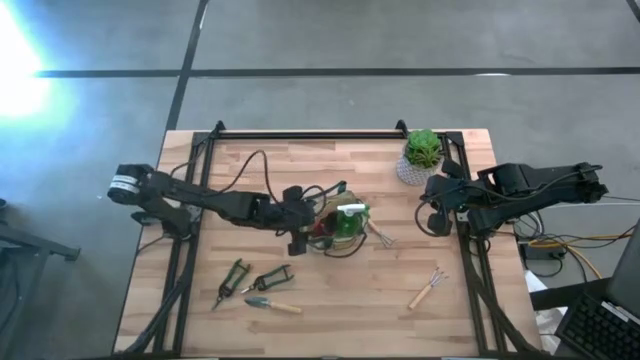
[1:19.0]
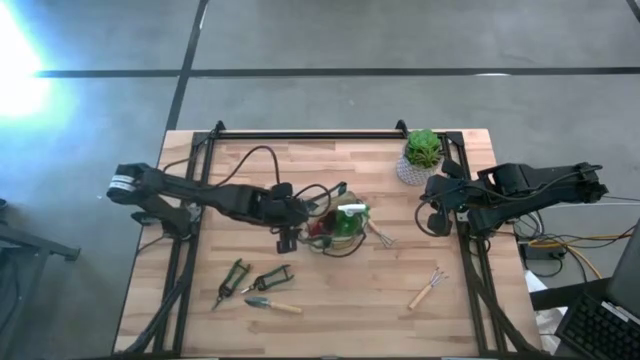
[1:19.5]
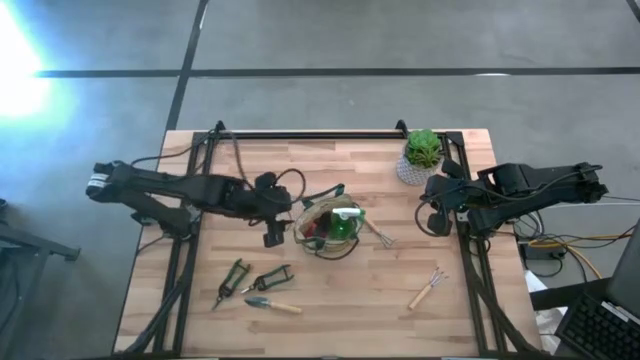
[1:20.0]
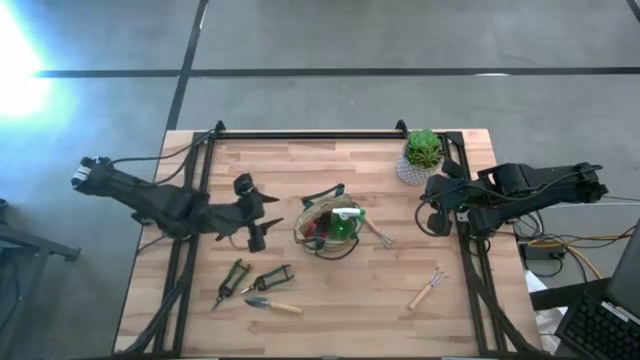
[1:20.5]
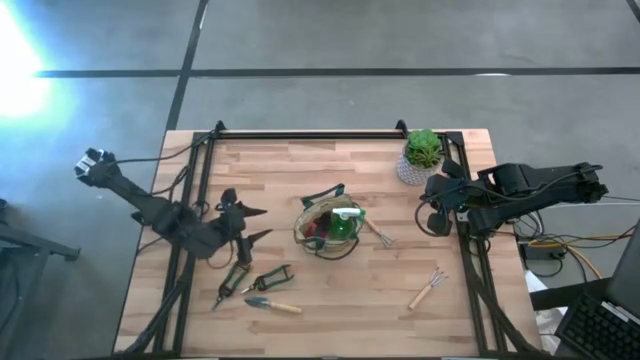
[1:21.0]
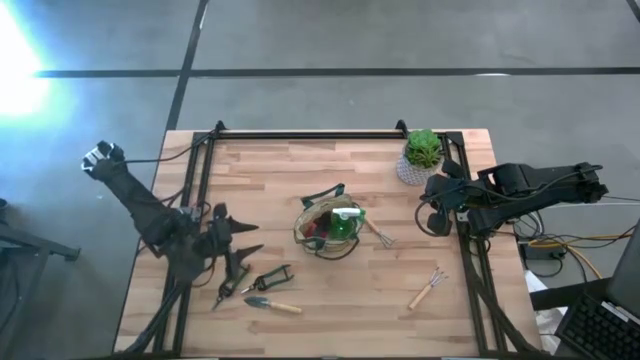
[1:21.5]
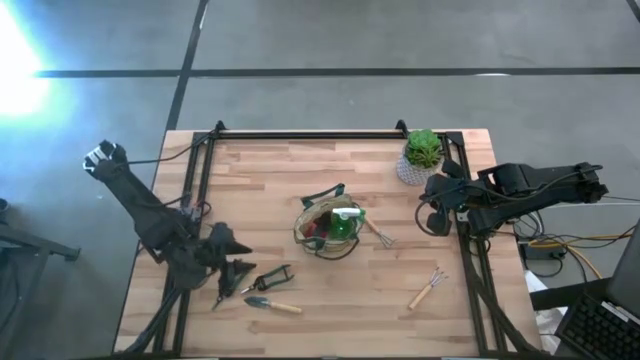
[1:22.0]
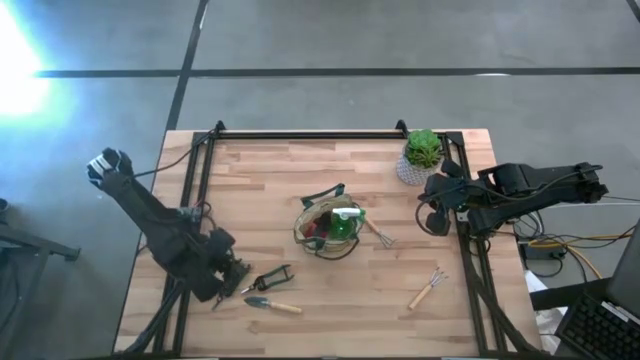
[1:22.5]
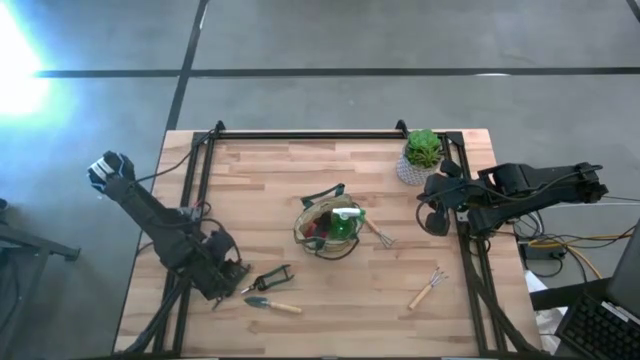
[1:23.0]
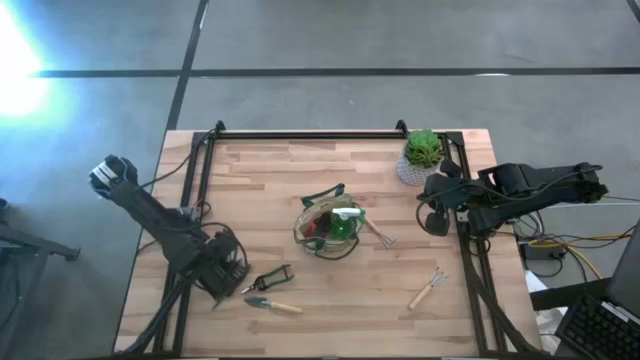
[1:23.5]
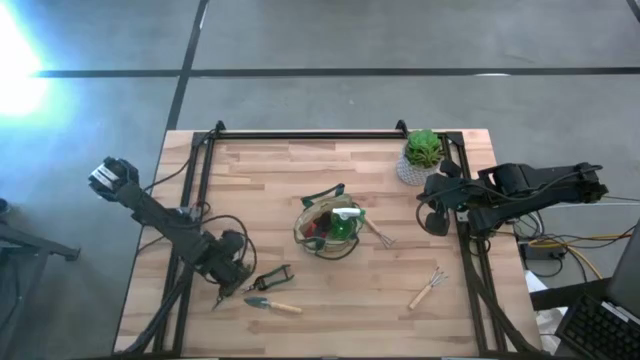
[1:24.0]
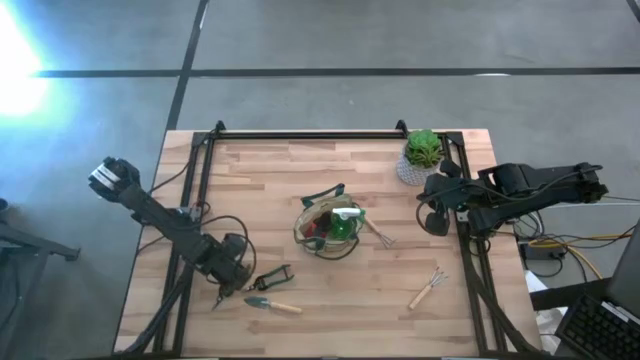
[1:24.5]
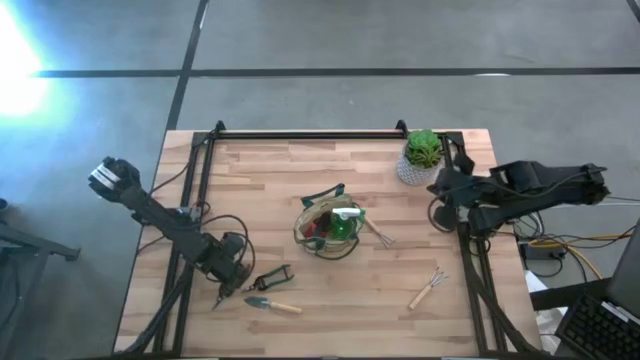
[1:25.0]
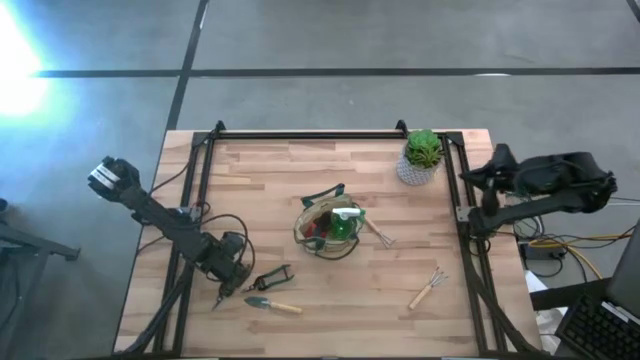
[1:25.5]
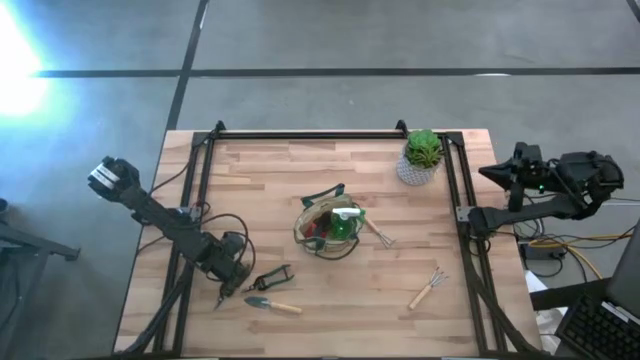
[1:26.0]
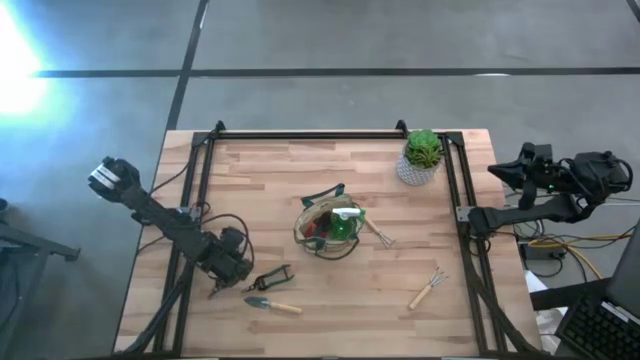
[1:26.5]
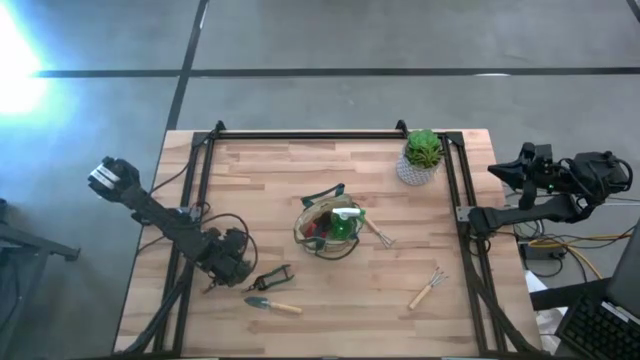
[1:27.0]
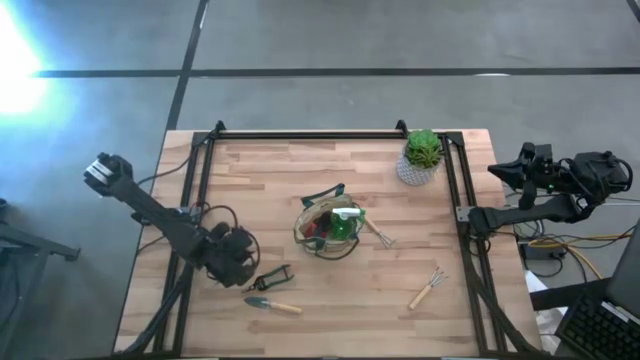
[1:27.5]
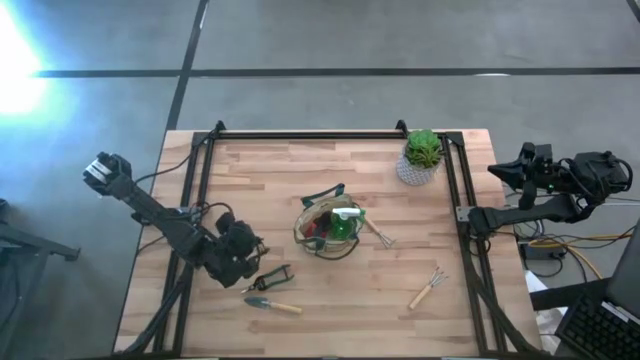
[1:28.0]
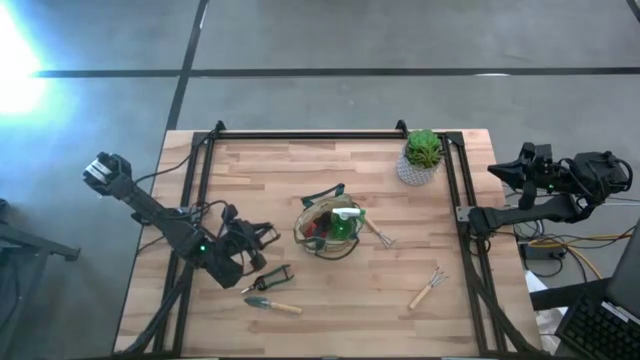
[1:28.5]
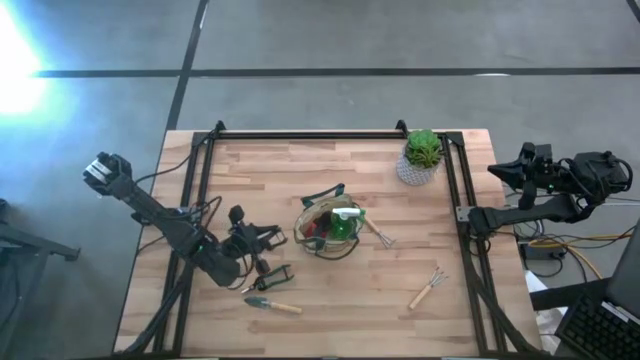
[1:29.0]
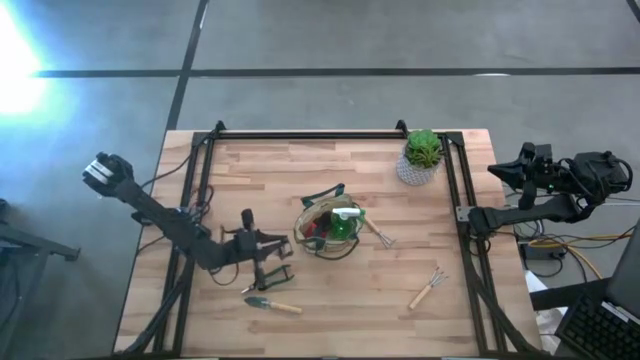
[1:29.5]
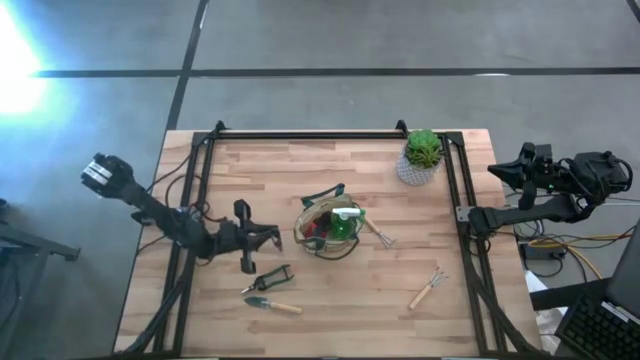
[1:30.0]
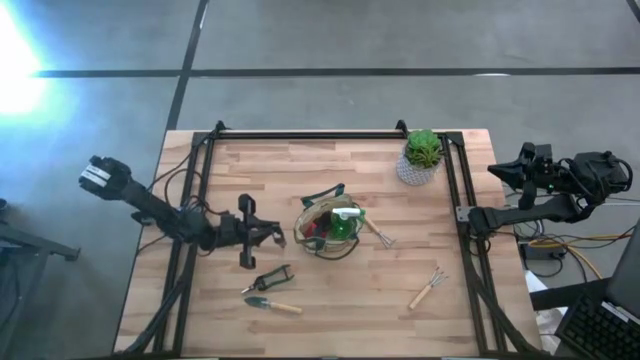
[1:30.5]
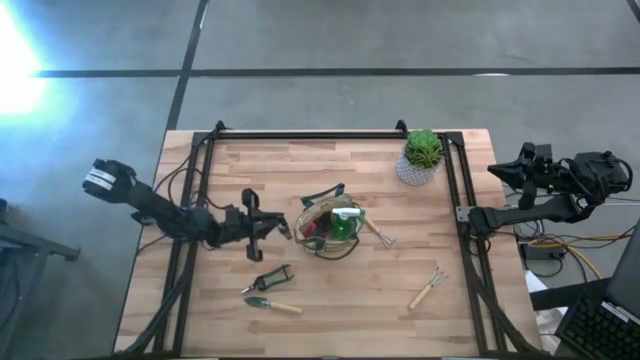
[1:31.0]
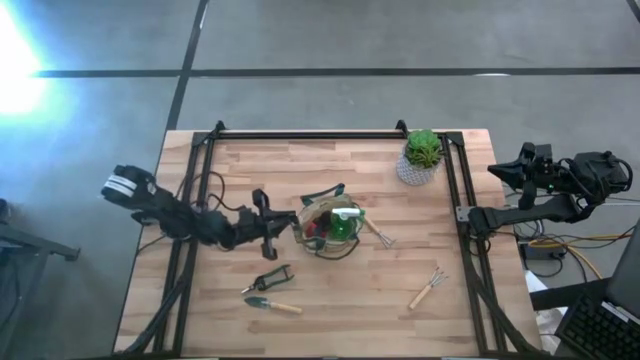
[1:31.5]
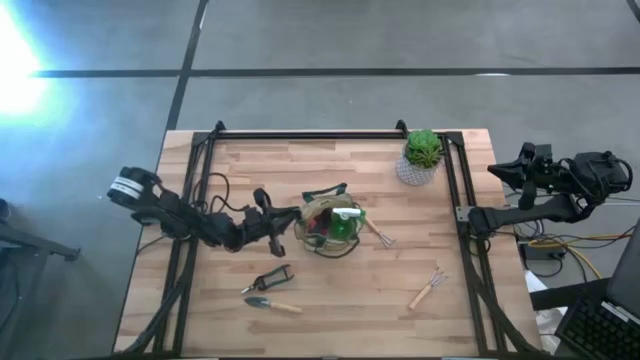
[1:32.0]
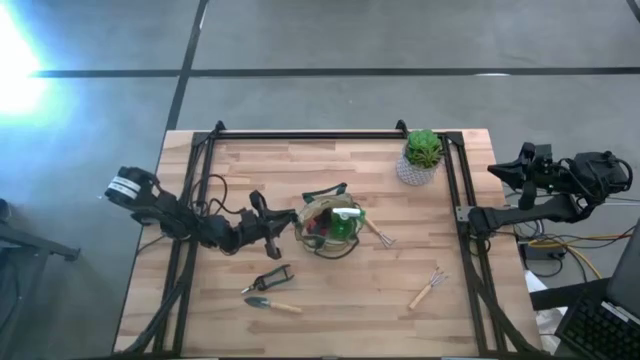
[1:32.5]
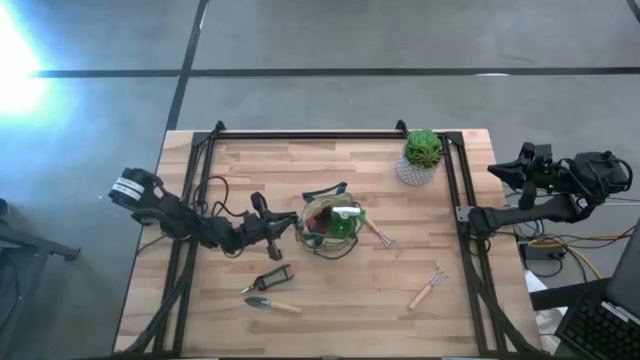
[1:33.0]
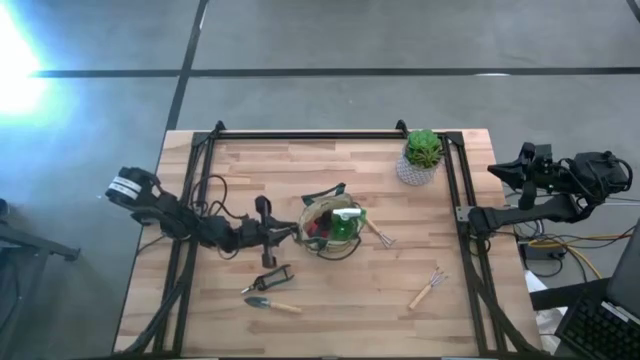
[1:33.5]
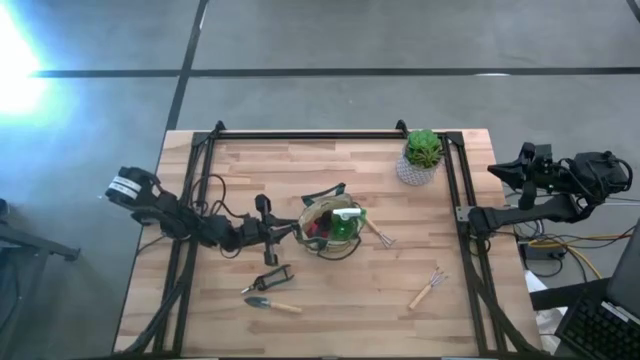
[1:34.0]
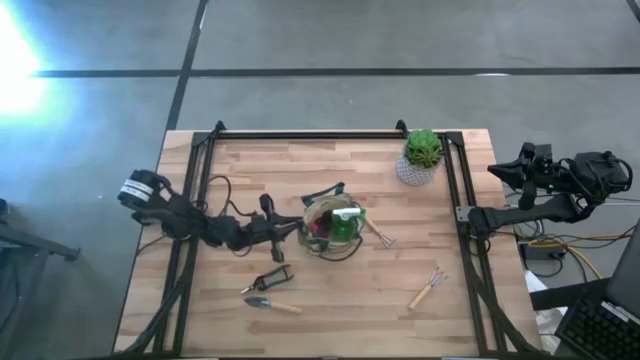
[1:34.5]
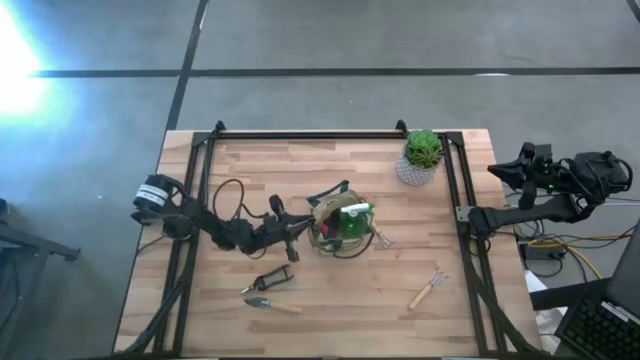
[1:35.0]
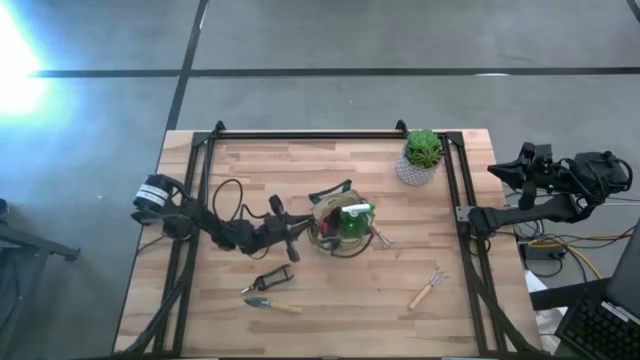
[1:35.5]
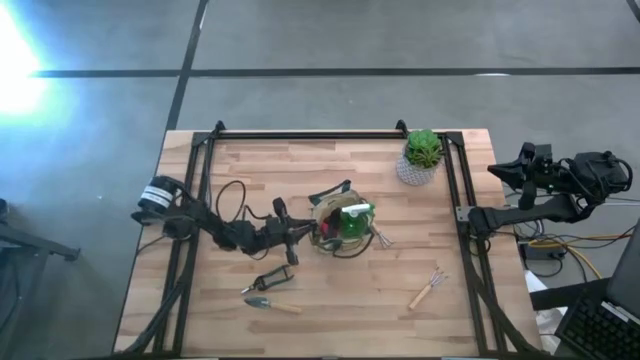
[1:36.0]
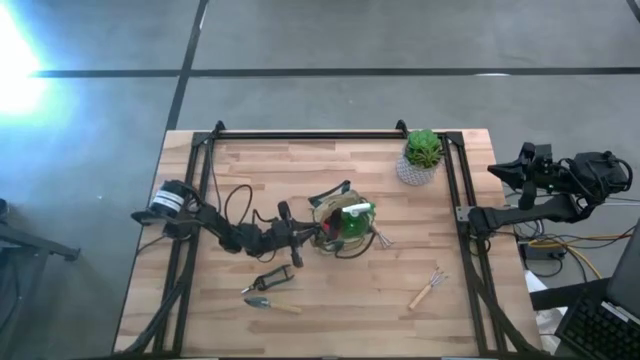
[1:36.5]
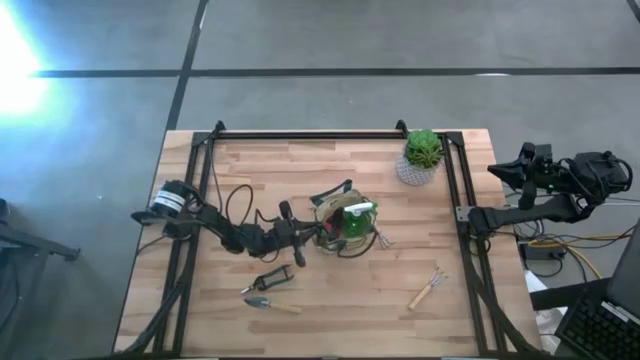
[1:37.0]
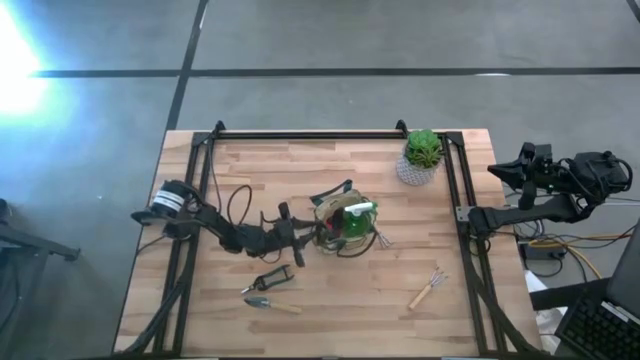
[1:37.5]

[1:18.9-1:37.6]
Task: Pick & Place Garden tools in Gardening bag
Put the left green fruit pruner into the light brown gardening bag

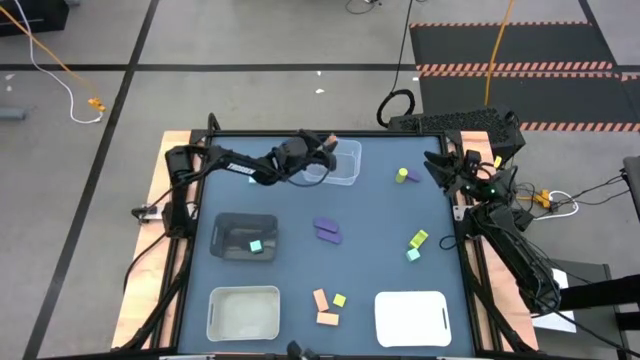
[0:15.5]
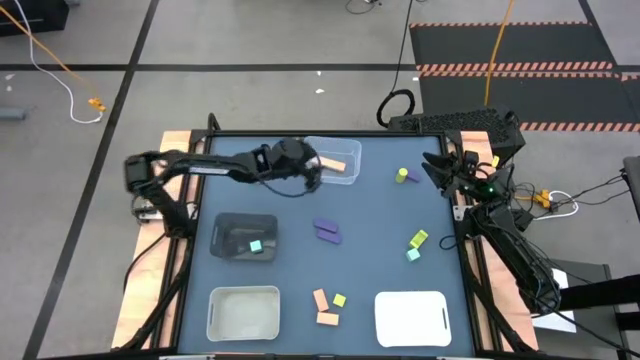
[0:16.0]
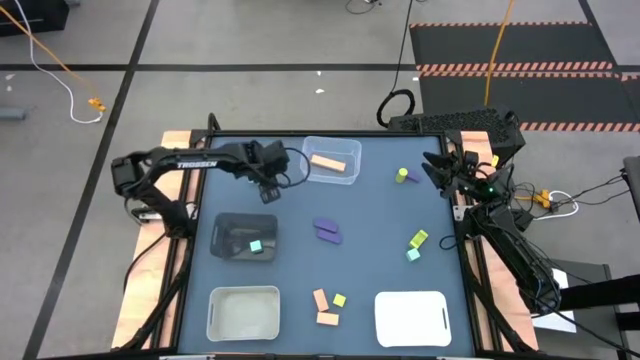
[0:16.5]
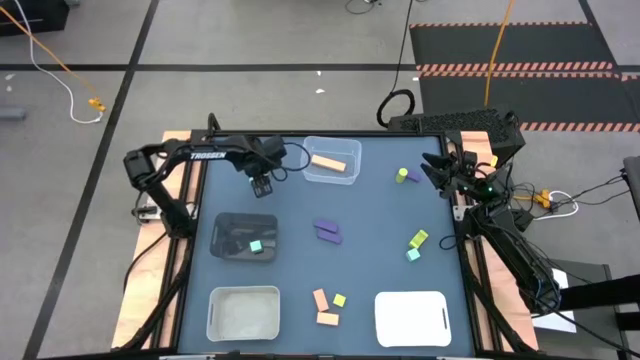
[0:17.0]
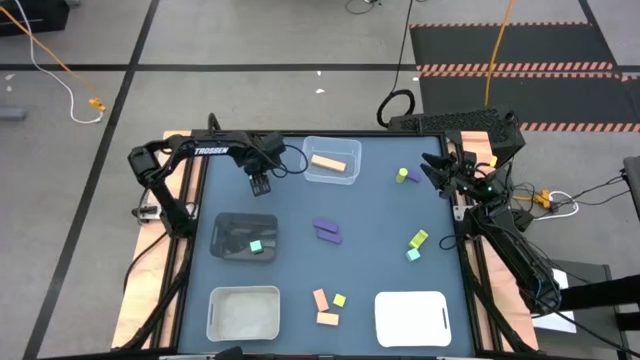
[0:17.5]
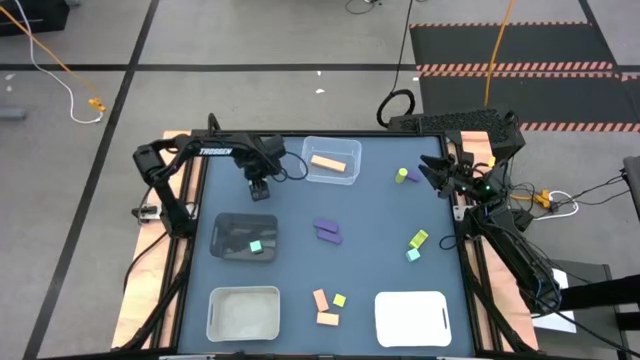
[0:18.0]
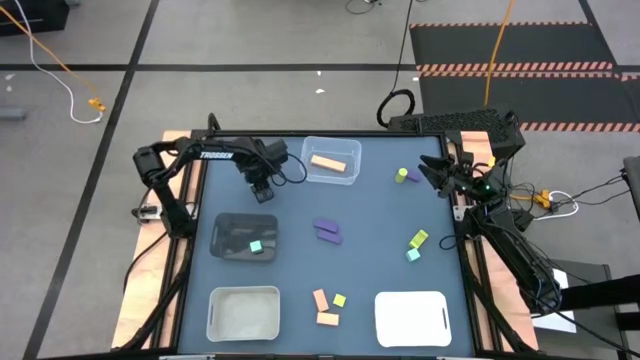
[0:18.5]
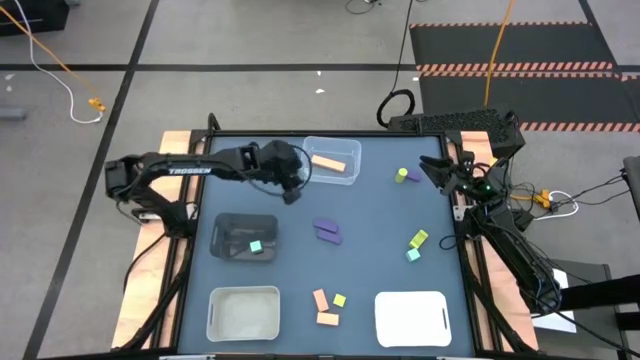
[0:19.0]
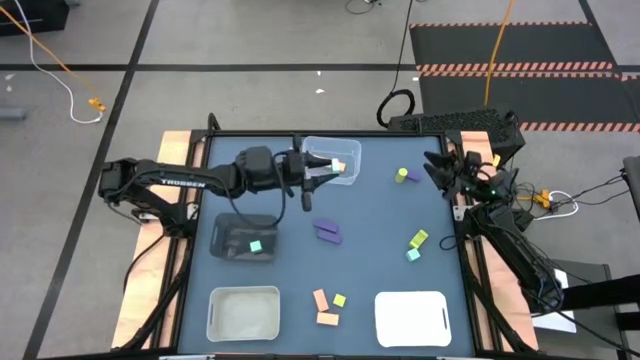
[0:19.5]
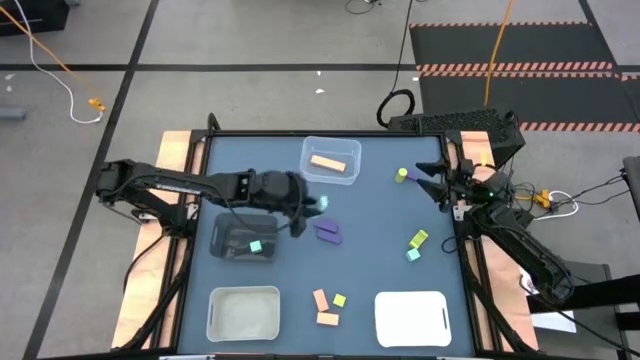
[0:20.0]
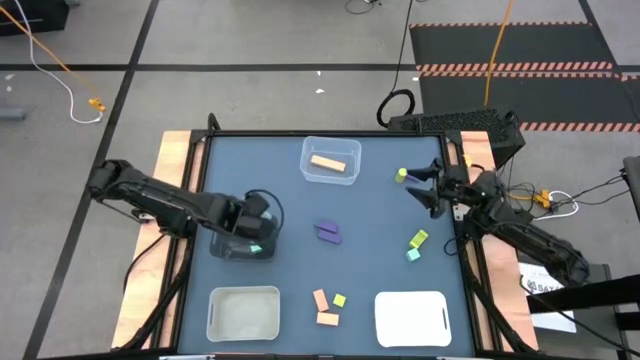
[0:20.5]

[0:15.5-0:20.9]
Task: Sort & place blocks by color
Put the top blue blocks into the black bin
